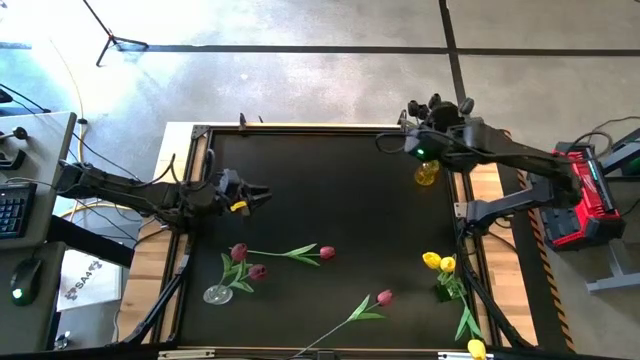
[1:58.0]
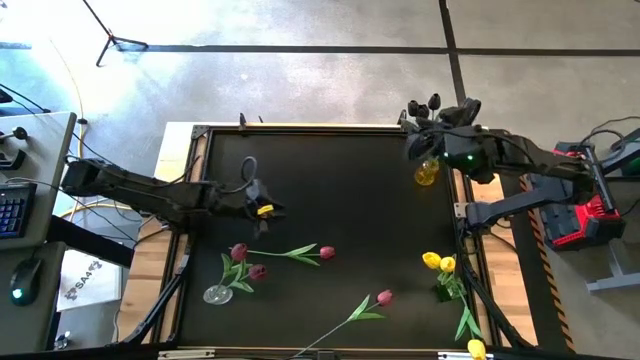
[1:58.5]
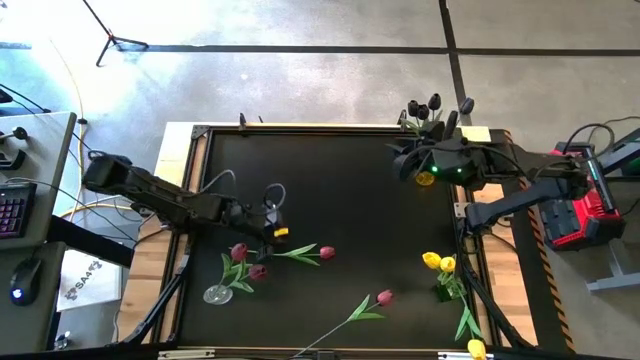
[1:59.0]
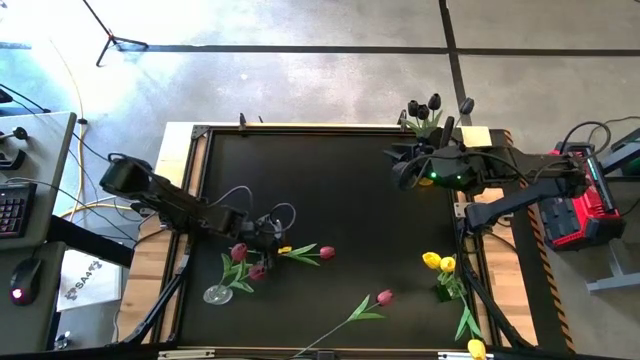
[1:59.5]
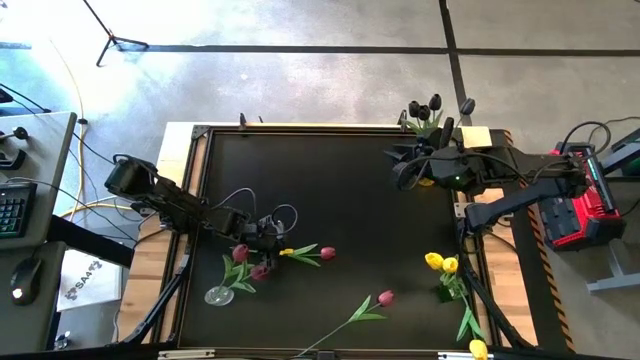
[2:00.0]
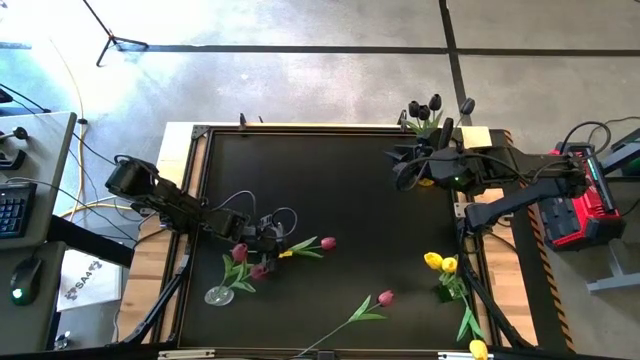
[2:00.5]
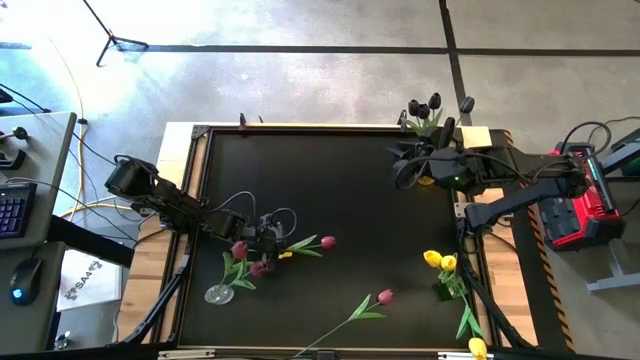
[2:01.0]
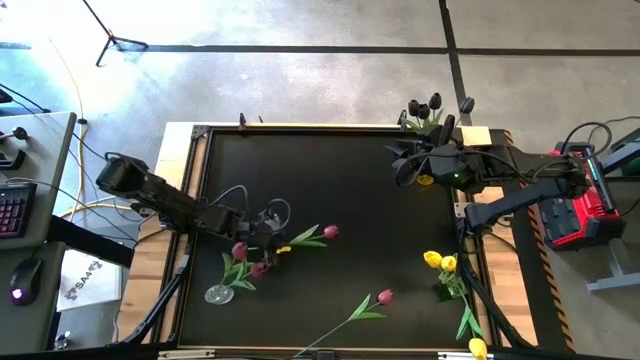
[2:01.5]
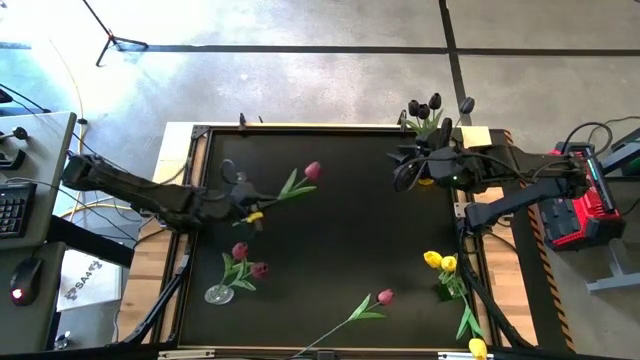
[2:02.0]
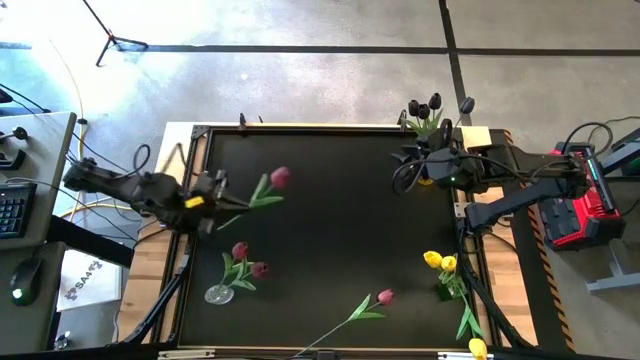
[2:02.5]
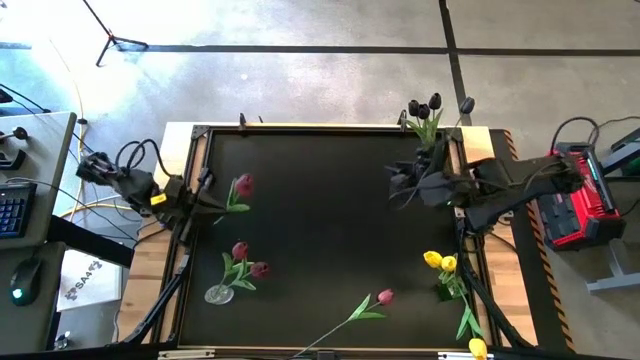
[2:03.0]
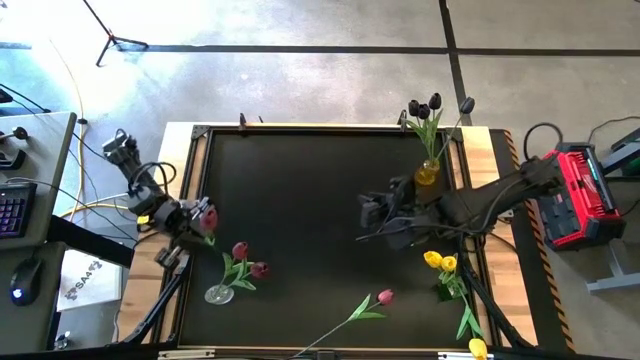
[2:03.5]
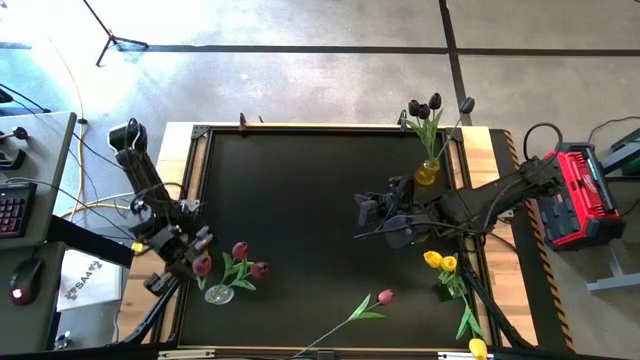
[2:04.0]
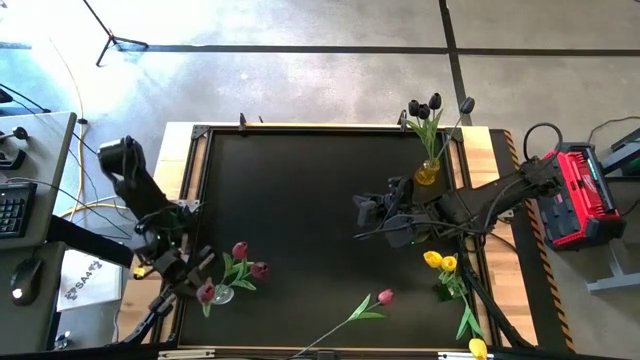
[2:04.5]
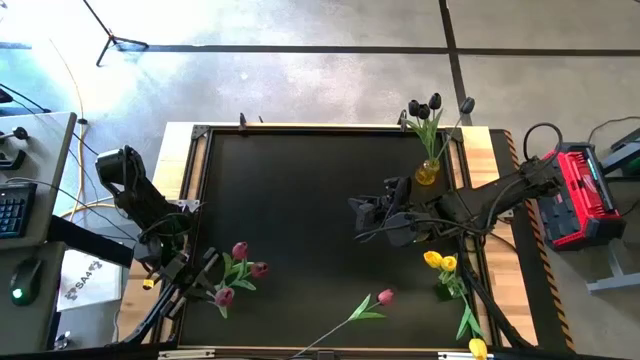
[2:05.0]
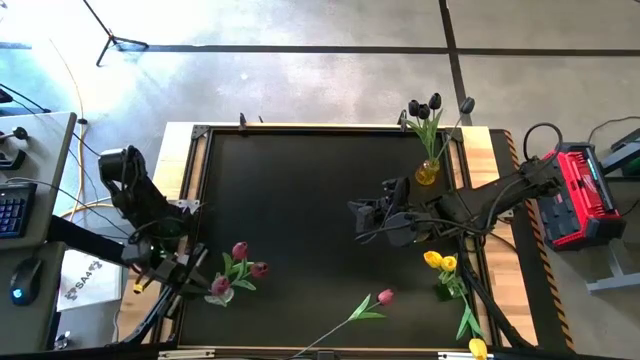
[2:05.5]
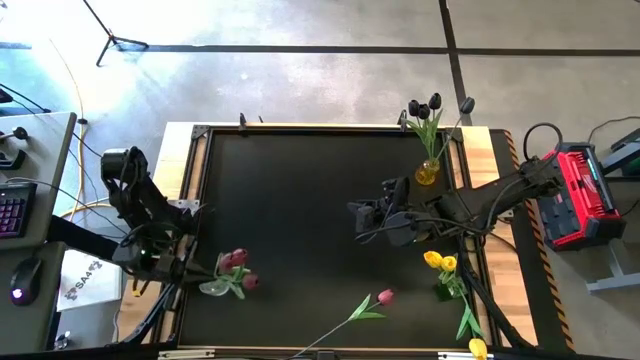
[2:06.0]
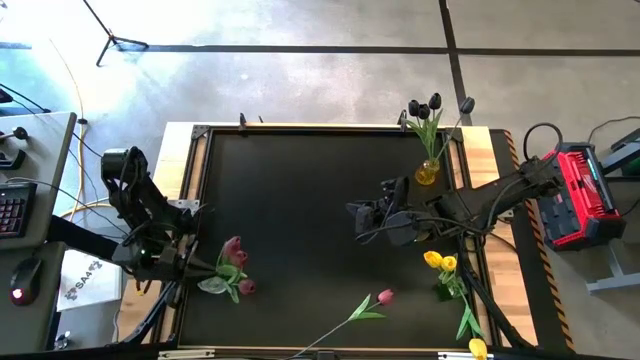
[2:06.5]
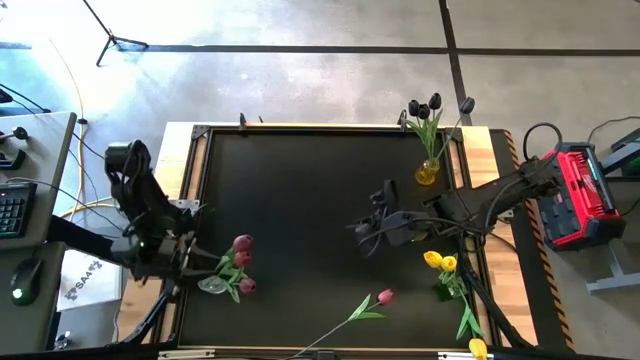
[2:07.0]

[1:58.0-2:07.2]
Task: Sort flowers into vase by color
Put the top red flower into the transparent vase

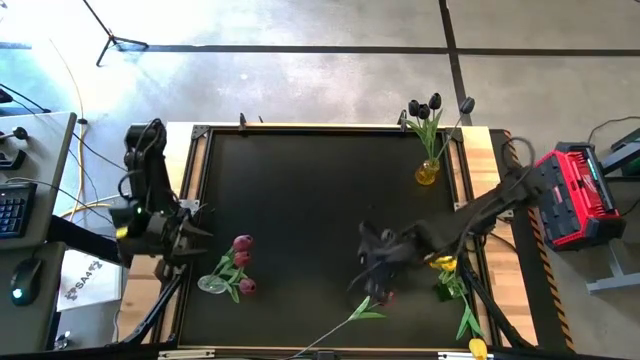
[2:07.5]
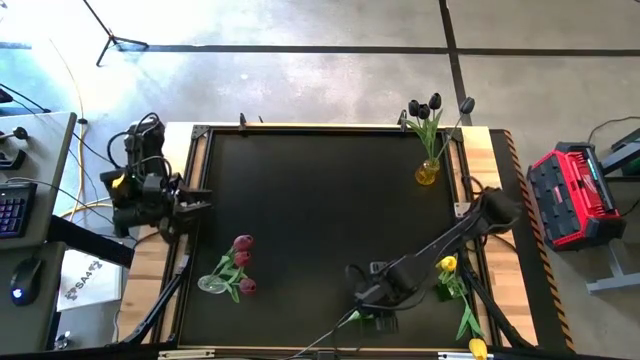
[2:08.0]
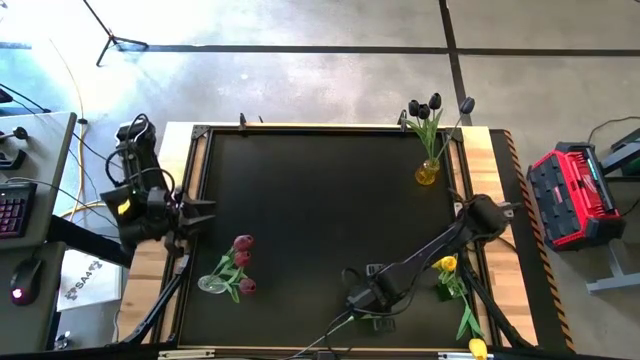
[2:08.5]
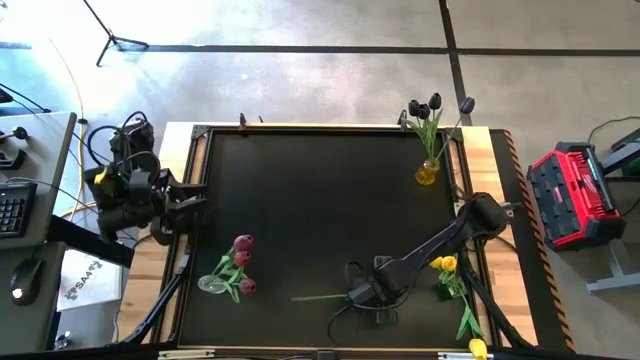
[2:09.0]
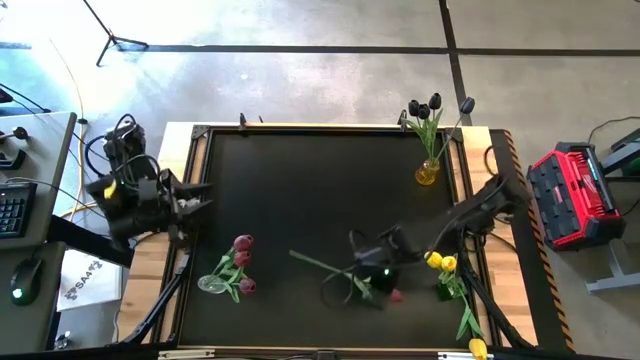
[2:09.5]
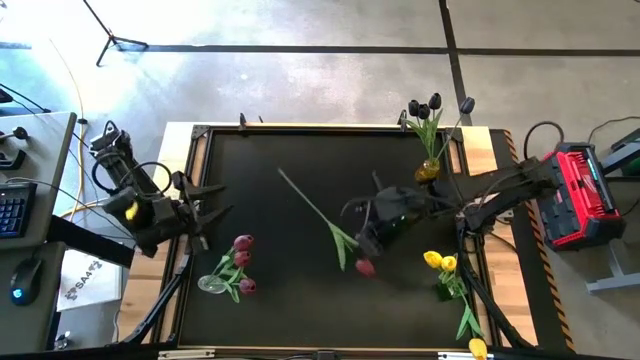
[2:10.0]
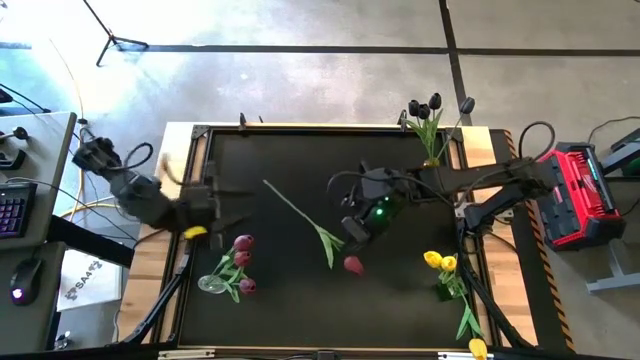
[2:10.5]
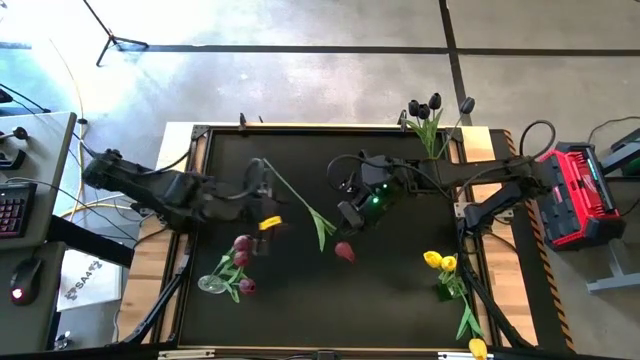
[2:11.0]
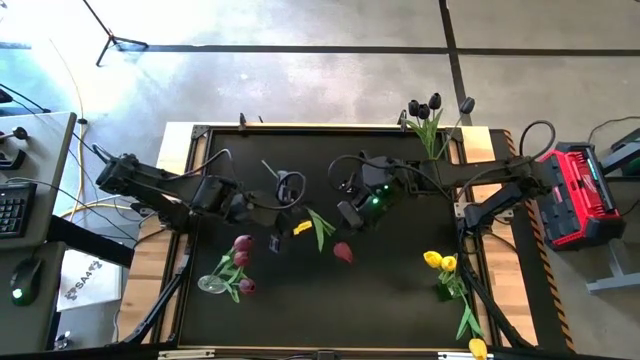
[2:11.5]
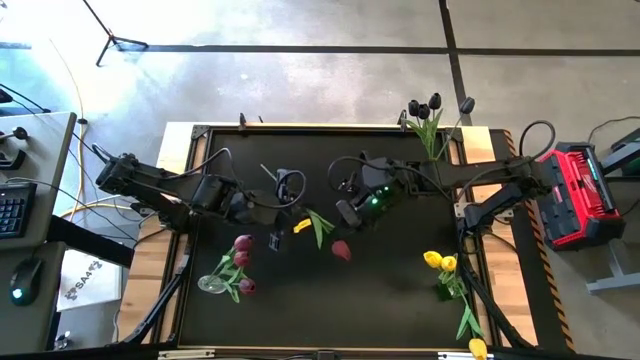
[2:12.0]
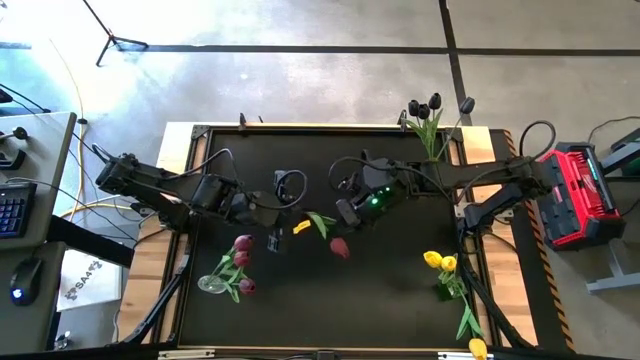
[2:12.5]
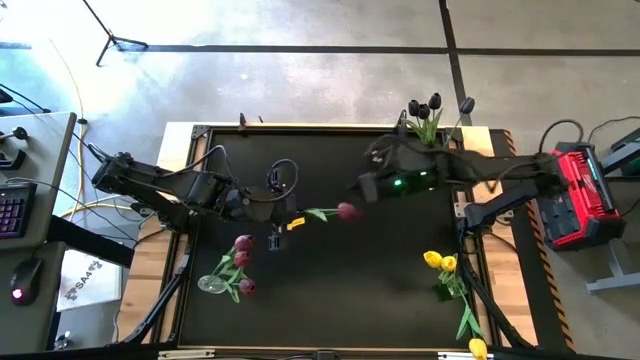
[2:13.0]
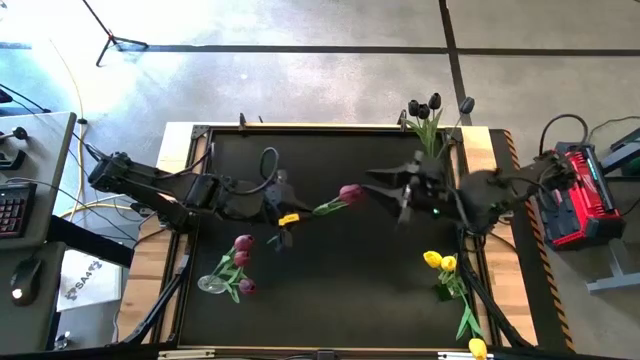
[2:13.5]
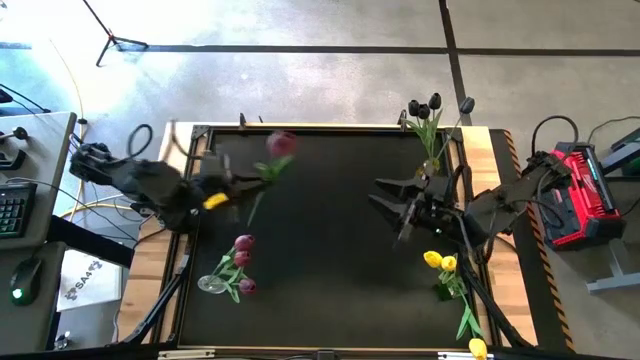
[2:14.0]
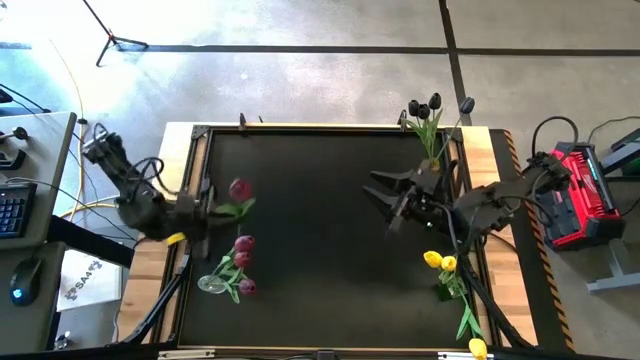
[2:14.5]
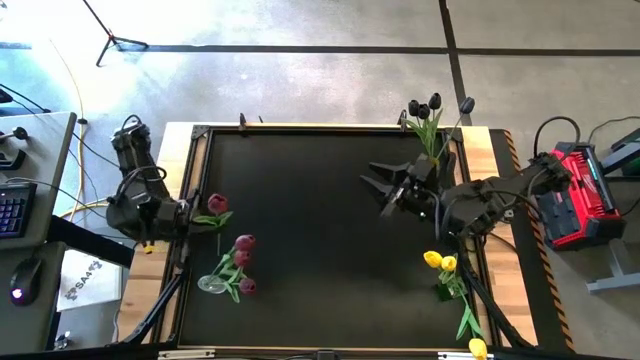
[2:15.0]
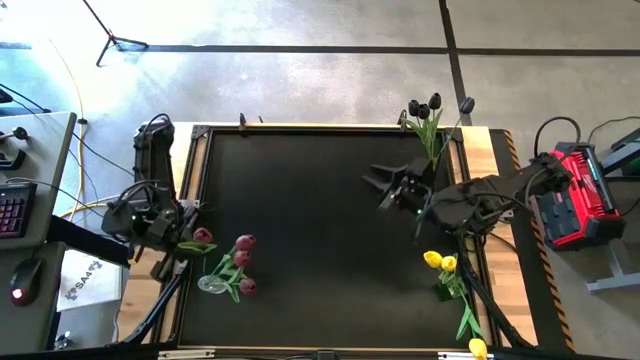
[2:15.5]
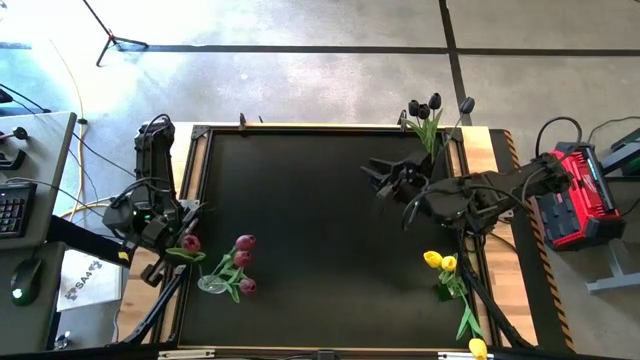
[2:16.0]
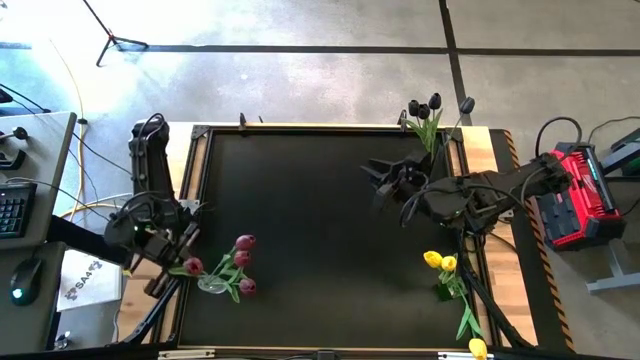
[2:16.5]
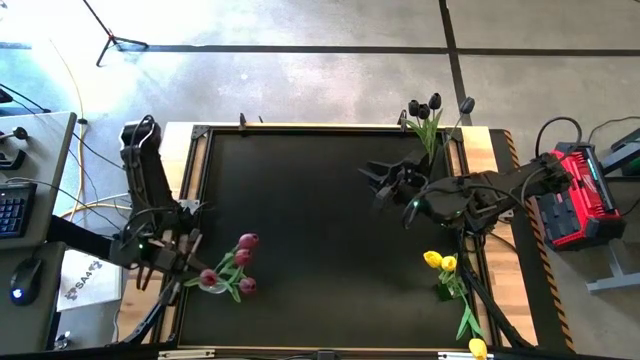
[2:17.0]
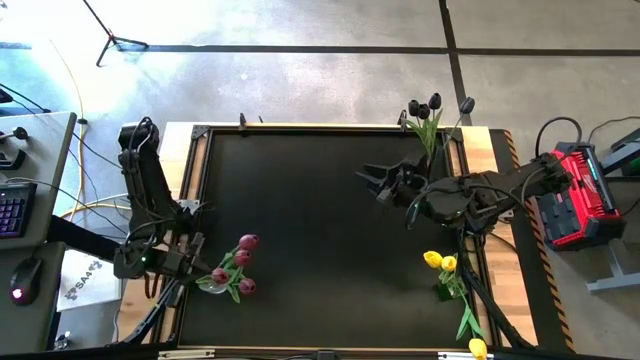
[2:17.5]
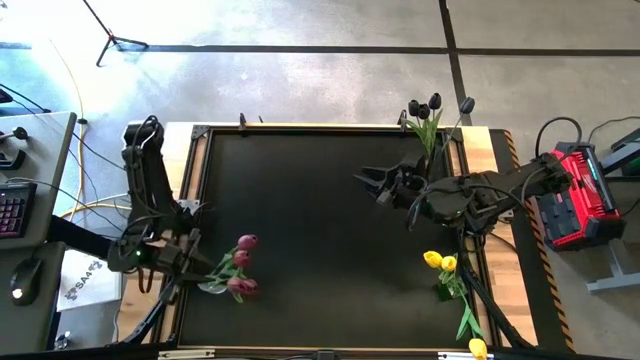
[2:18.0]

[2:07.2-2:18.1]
Put the red flower into the transparent vase
